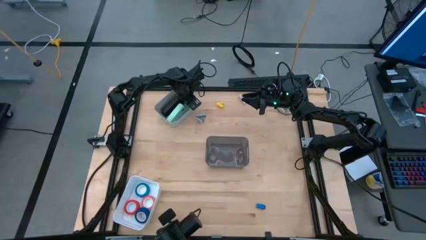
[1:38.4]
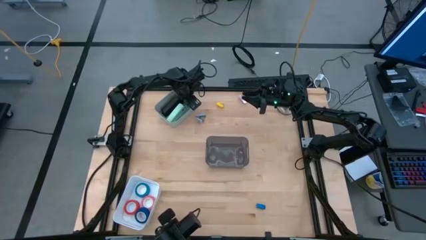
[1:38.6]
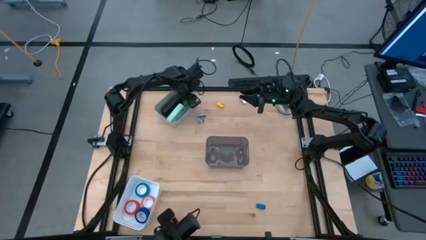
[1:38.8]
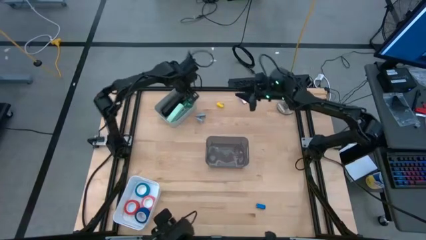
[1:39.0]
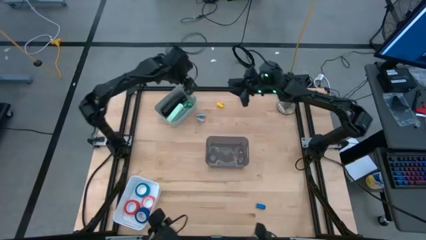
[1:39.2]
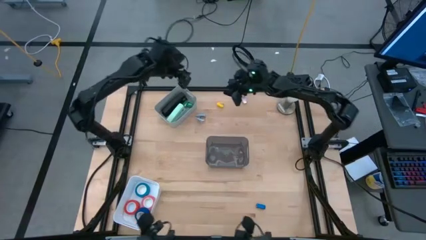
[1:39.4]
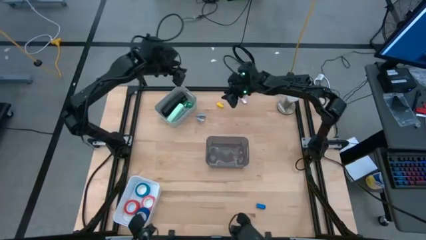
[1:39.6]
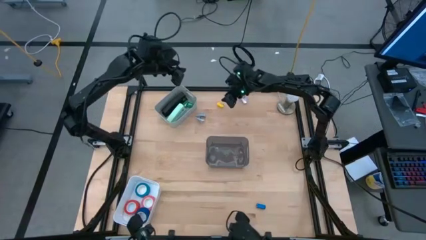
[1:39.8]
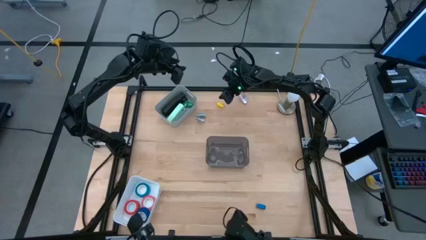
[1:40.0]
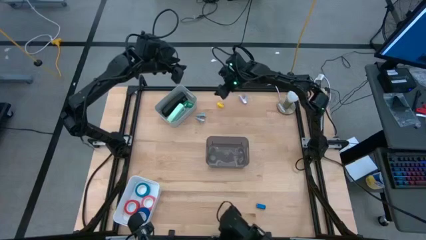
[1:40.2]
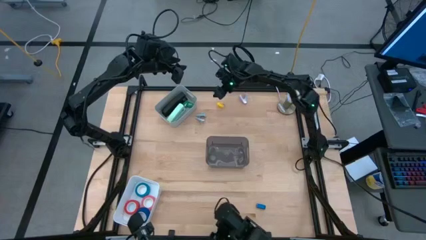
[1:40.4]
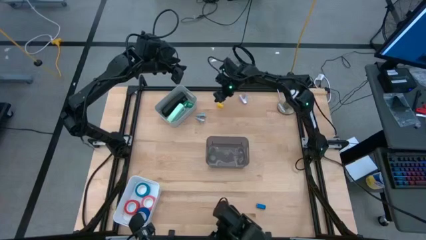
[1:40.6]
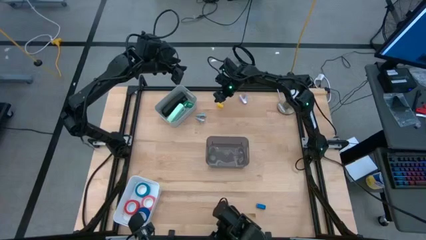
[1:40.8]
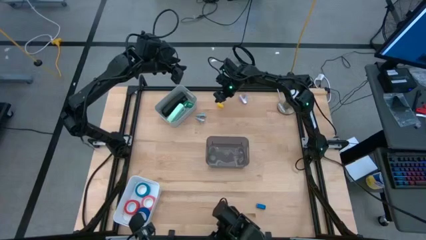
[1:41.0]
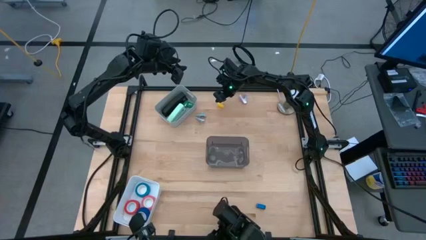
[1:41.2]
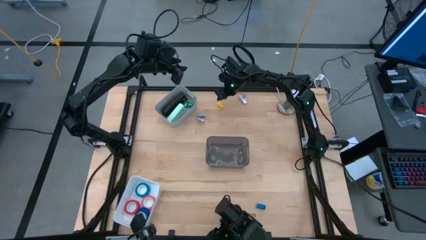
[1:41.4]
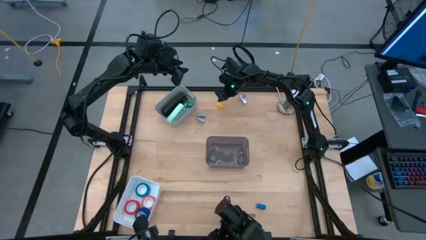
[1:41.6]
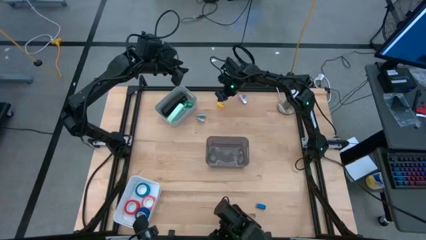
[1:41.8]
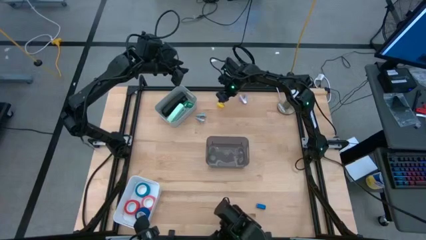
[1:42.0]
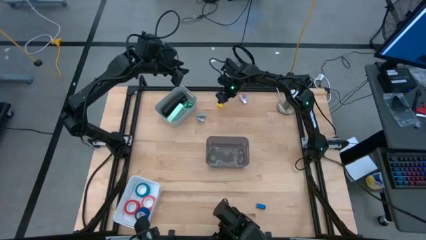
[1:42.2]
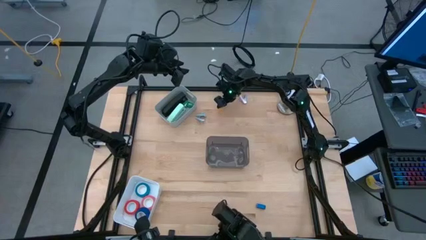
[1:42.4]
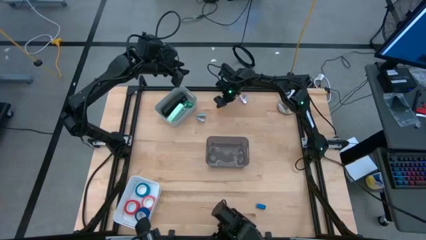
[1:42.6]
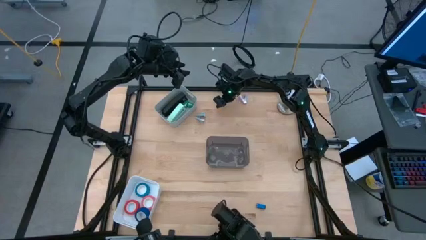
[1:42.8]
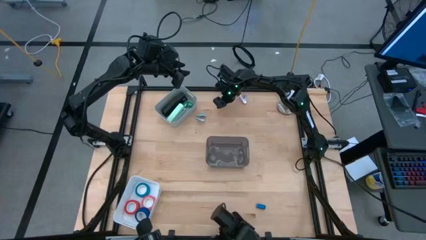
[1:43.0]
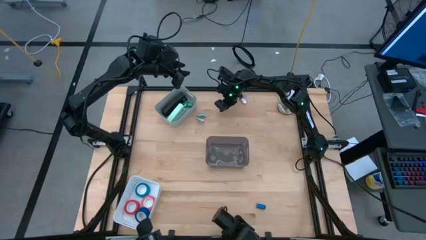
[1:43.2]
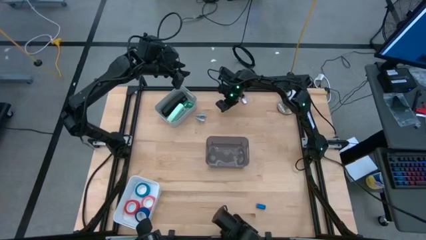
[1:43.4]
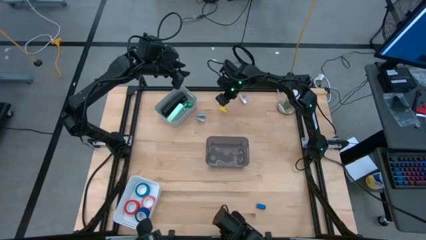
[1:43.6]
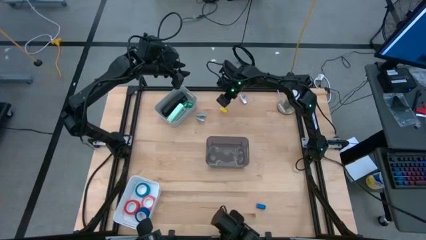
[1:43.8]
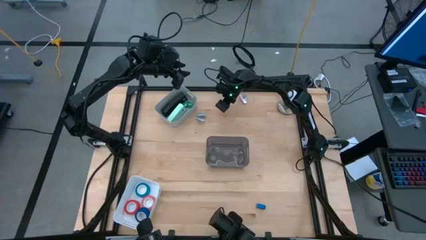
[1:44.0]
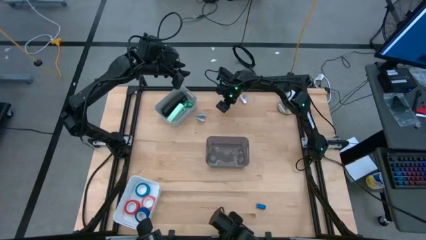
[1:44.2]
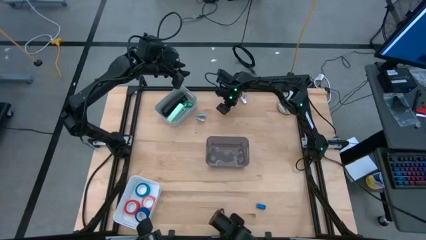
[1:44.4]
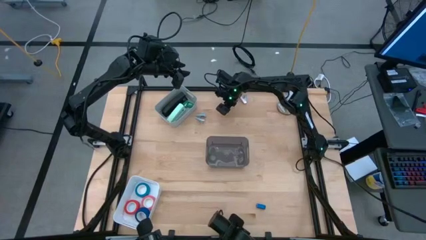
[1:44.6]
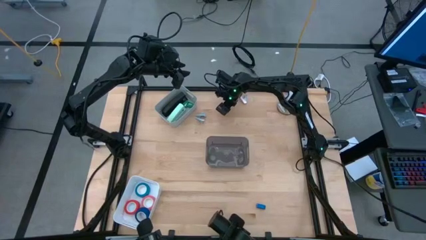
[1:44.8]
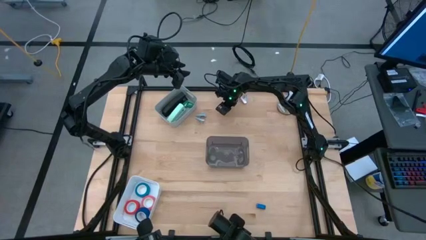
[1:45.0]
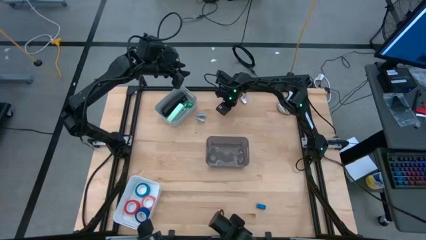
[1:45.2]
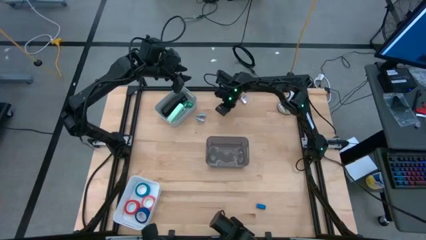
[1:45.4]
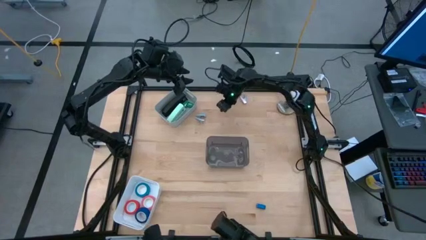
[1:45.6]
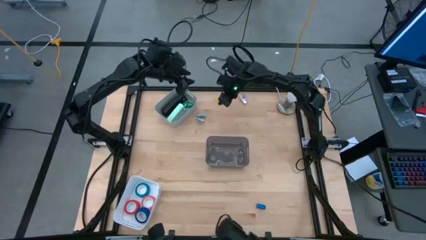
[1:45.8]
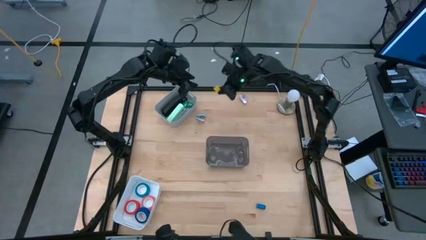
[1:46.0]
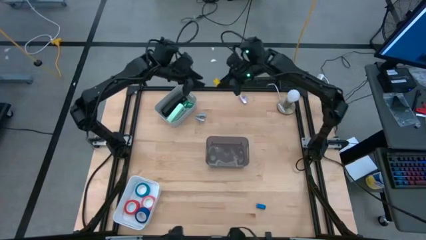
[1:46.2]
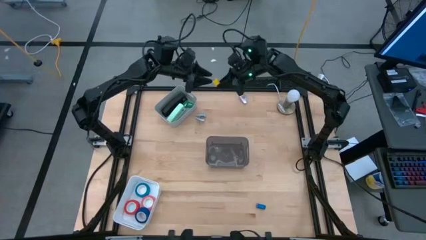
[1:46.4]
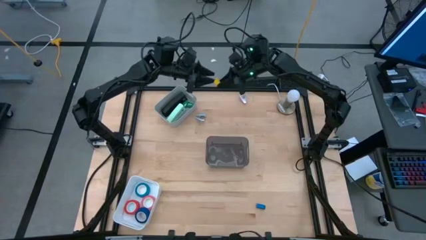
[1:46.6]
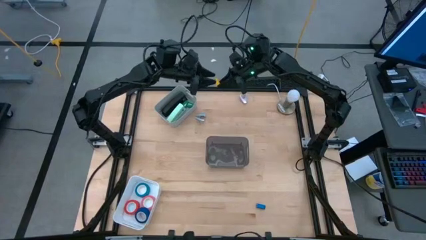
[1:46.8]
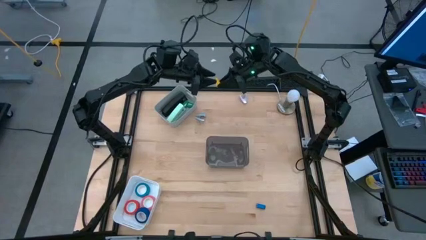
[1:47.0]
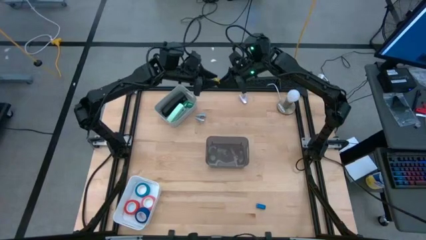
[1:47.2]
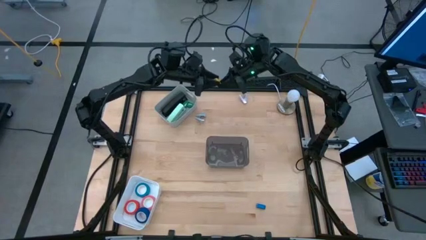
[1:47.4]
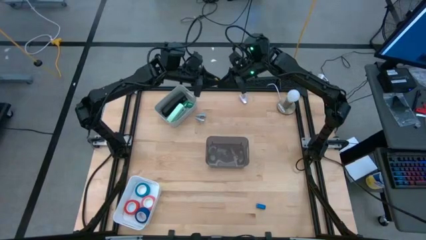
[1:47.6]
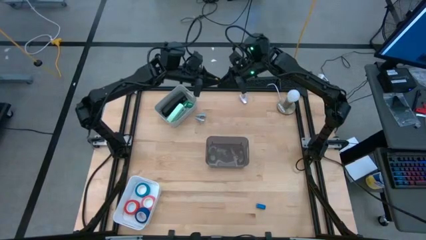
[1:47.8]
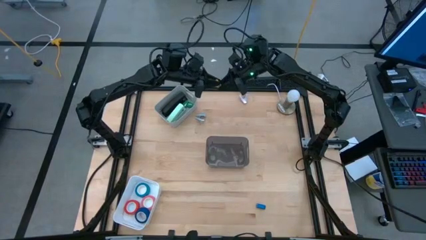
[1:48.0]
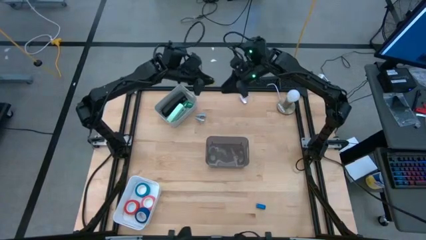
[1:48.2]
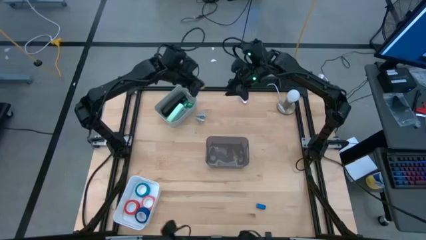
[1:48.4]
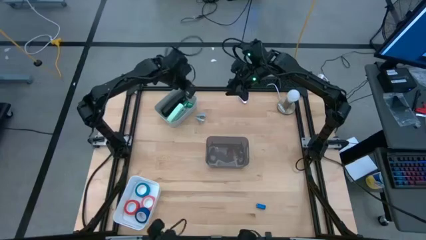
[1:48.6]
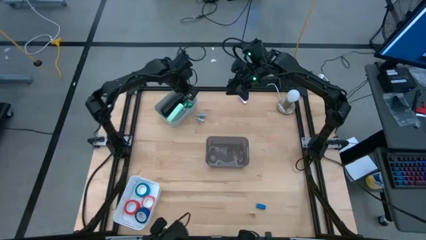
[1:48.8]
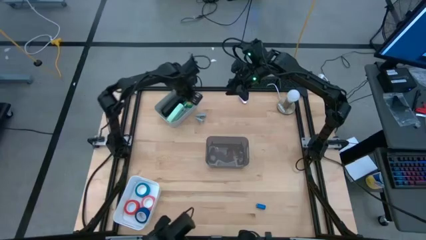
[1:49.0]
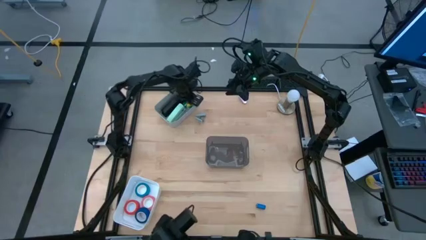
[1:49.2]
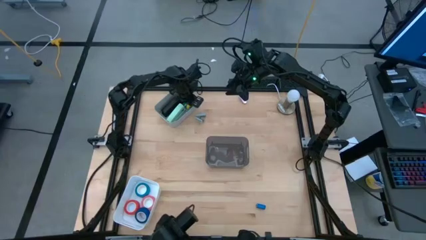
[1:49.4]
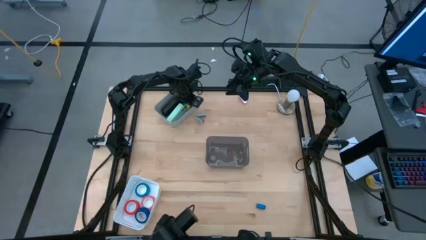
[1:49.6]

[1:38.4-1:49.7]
Task: Pick and place Stapler, Stapler remover, tape
Put the yellow stapler into the gray bin

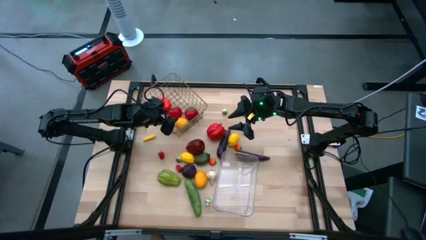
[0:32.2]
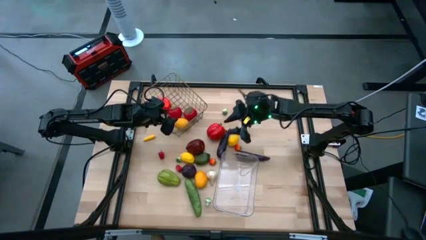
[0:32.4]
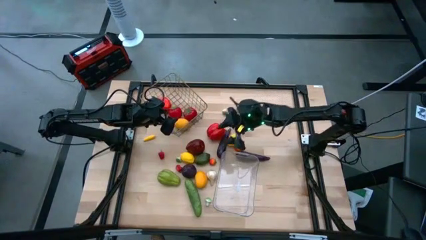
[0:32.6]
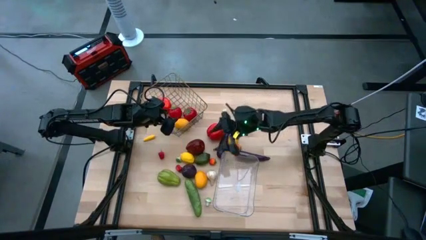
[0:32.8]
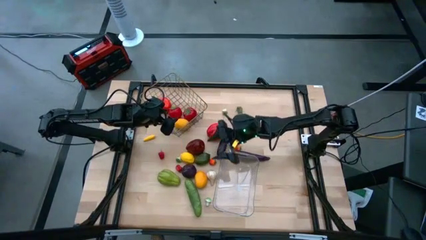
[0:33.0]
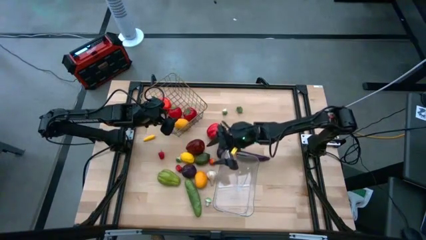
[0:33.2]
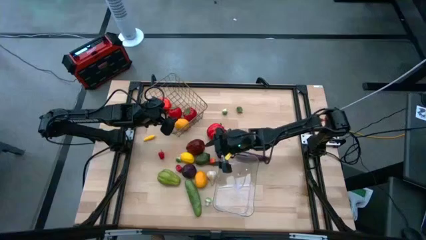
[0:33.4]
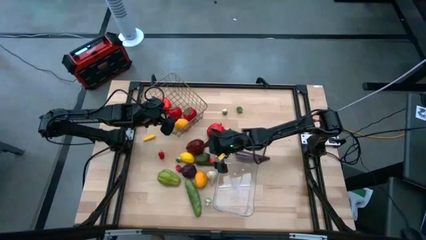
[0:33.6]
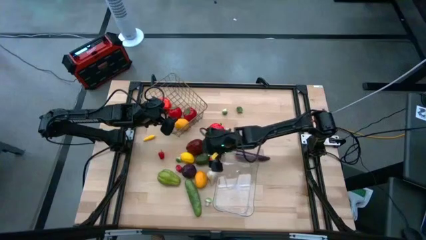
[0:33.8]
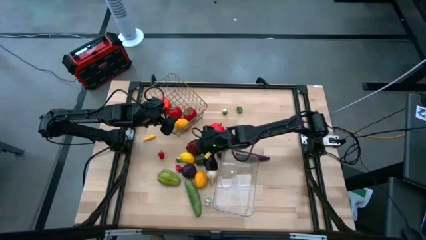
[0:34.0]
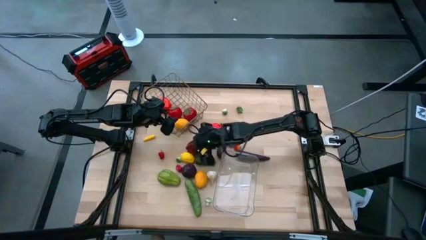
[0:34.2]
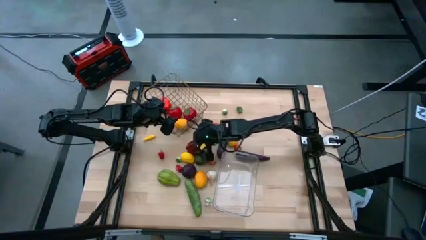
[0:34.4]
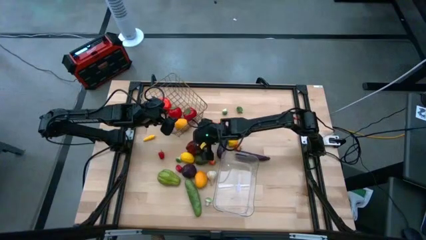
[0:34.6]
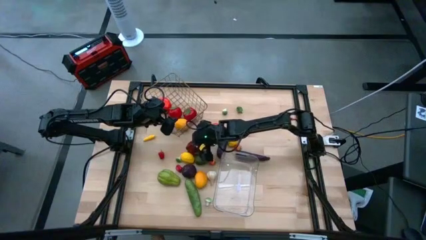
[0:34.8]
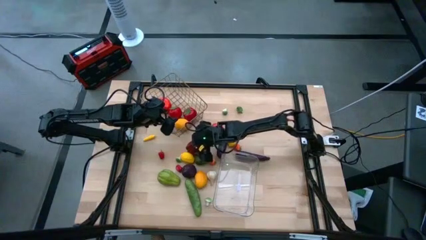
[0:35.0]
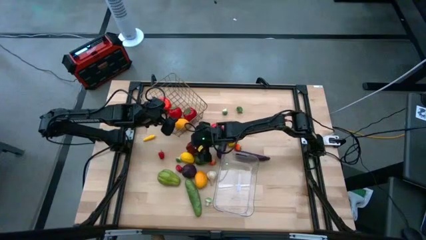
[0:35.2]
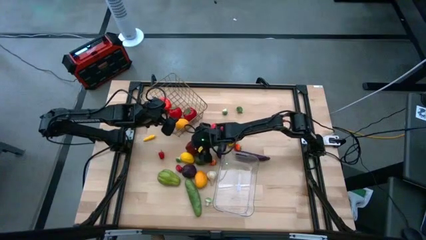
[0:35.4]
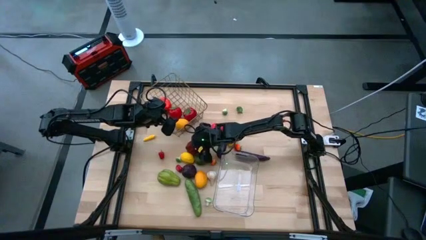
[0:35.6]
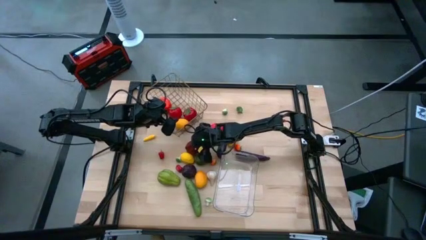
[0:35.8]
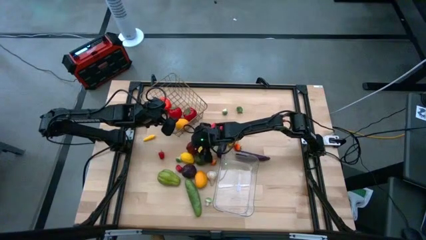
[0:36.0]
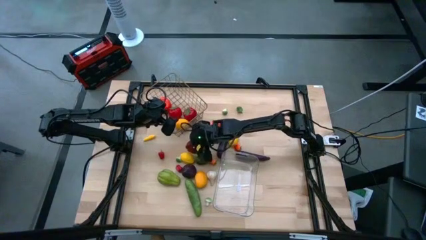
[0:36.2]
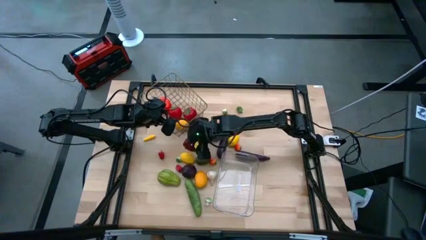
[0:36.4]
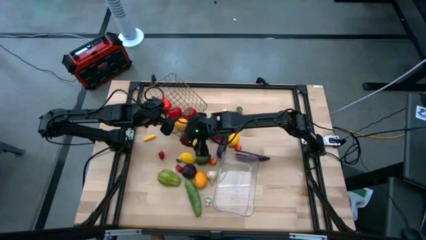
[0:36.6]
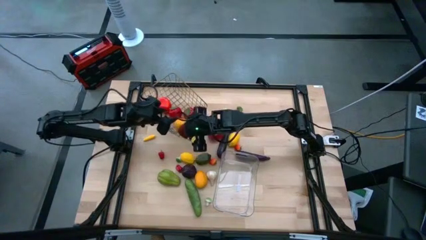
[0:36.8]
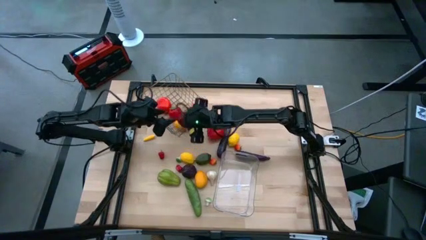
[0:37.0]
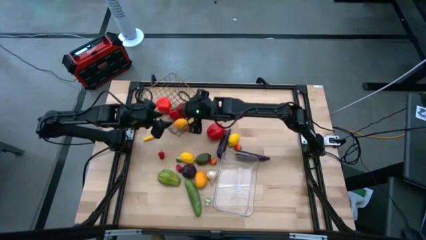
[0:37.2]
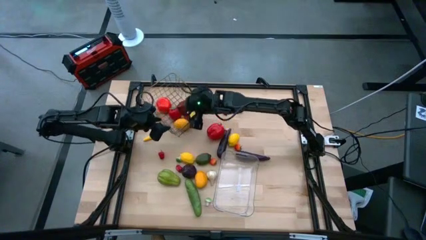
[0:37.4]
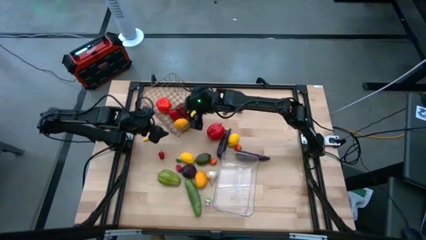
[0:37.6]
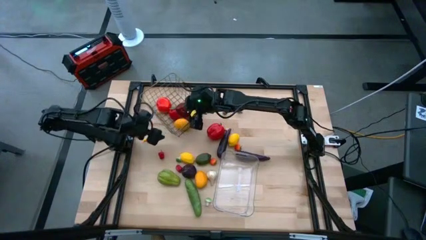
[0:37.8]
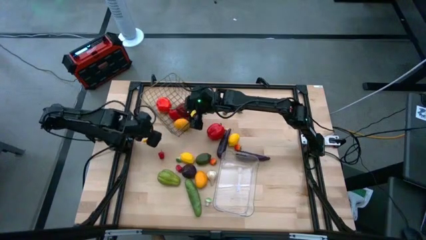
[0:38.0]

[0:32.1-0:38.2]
Task: Sort produce into baskets
Put the red apple into the wire basket
